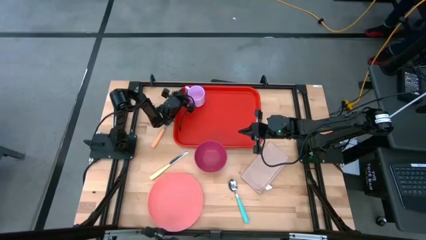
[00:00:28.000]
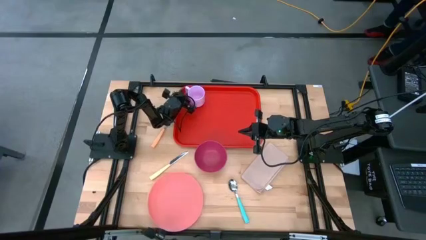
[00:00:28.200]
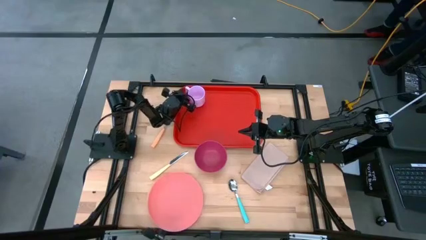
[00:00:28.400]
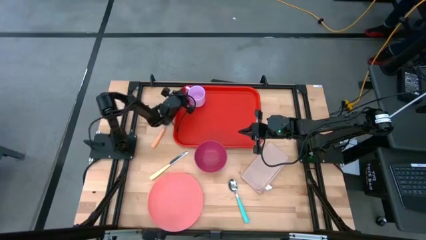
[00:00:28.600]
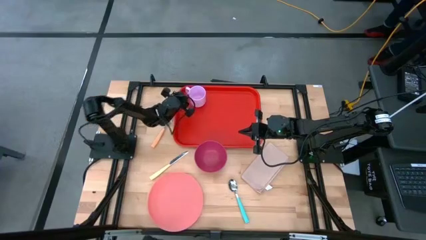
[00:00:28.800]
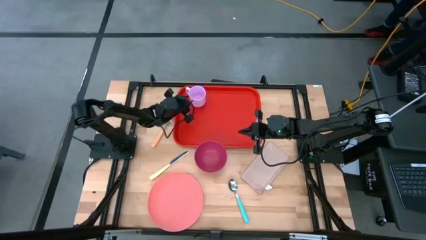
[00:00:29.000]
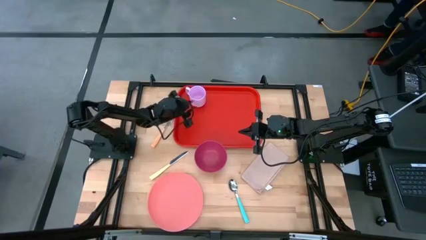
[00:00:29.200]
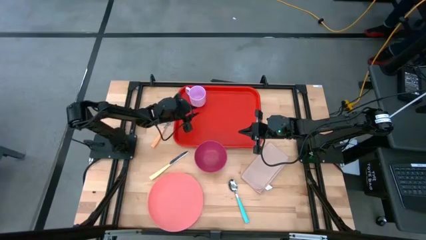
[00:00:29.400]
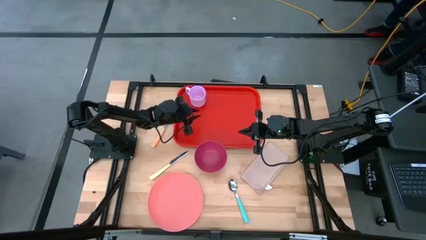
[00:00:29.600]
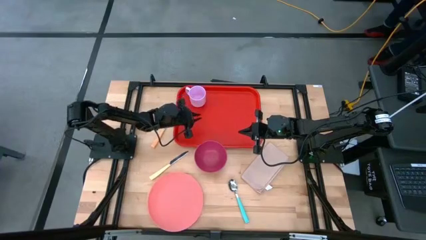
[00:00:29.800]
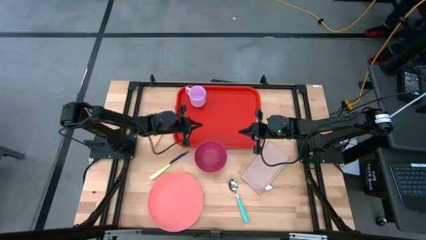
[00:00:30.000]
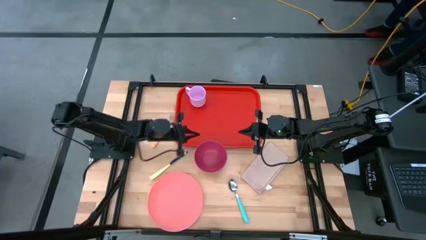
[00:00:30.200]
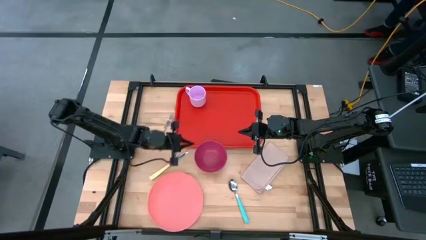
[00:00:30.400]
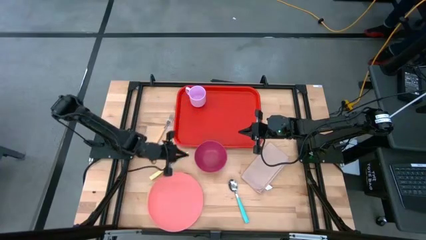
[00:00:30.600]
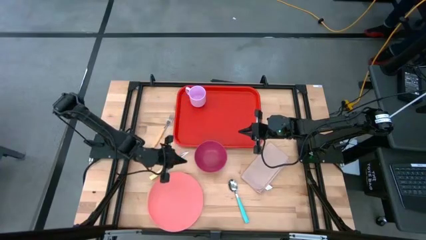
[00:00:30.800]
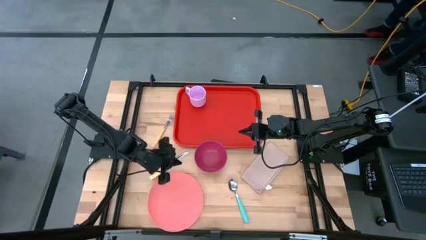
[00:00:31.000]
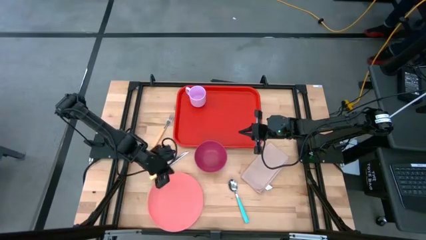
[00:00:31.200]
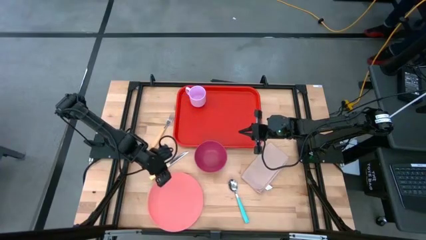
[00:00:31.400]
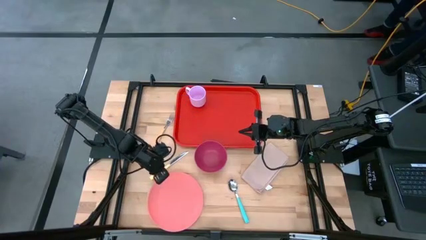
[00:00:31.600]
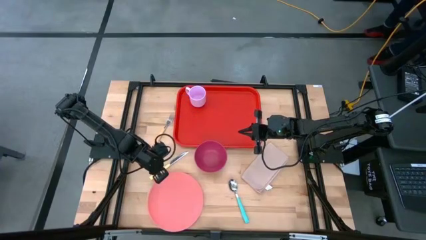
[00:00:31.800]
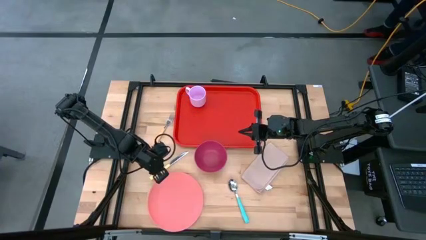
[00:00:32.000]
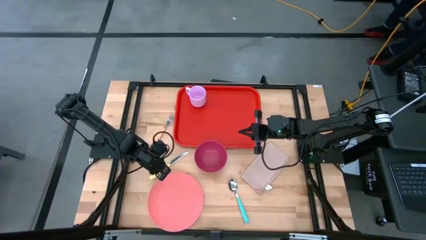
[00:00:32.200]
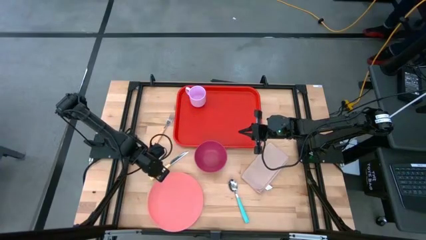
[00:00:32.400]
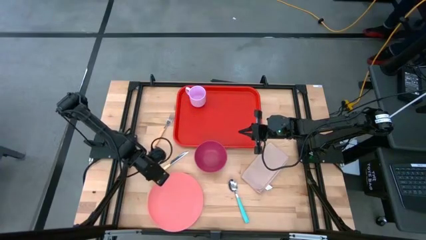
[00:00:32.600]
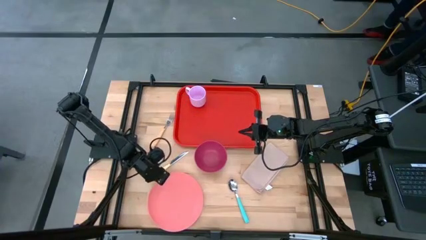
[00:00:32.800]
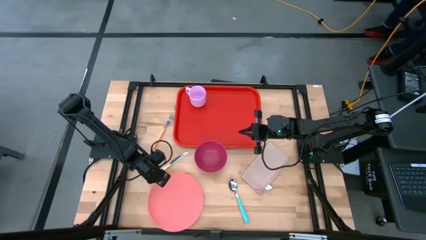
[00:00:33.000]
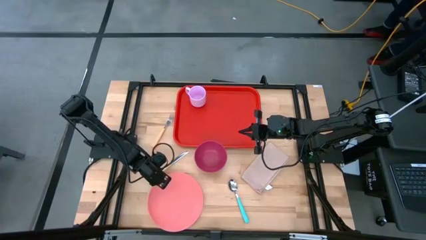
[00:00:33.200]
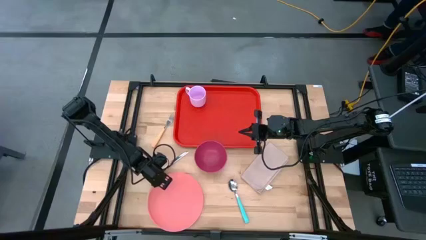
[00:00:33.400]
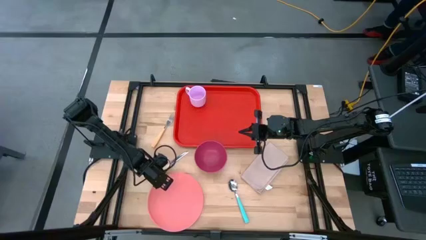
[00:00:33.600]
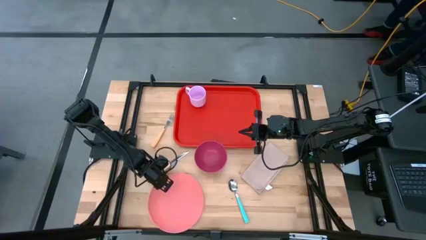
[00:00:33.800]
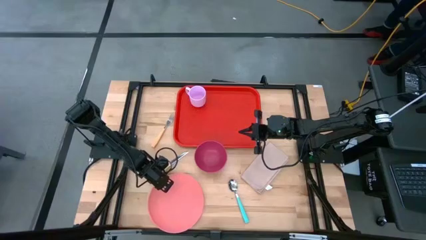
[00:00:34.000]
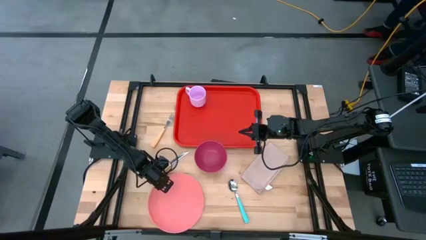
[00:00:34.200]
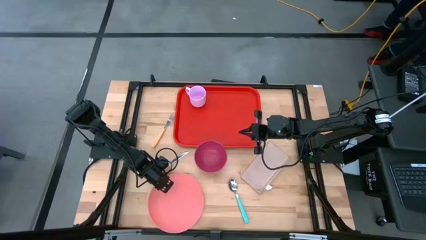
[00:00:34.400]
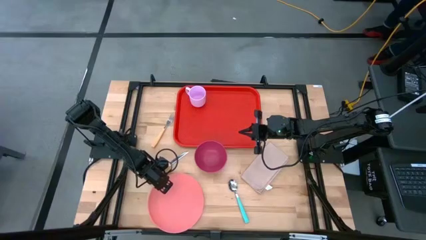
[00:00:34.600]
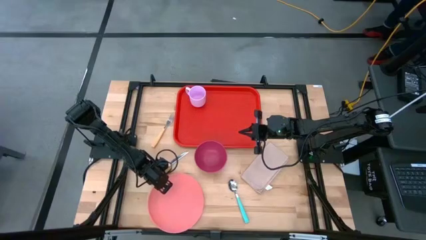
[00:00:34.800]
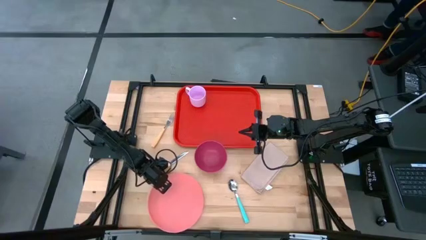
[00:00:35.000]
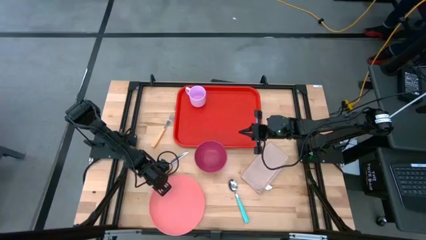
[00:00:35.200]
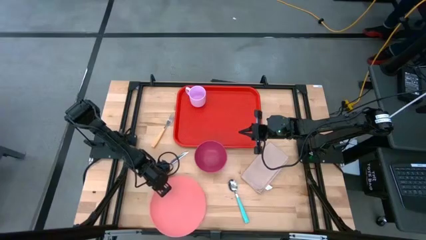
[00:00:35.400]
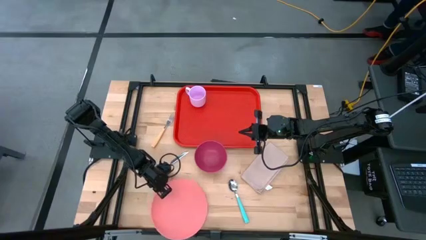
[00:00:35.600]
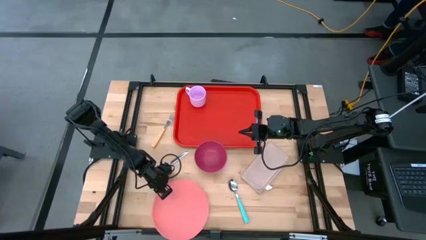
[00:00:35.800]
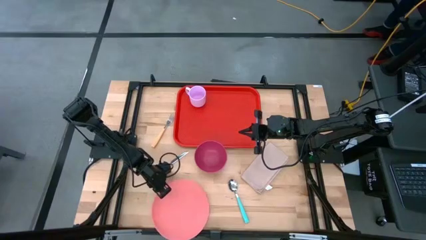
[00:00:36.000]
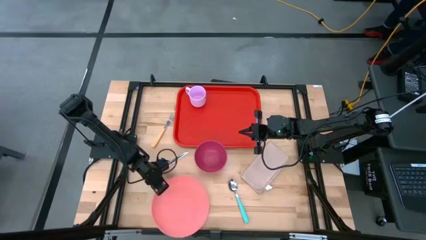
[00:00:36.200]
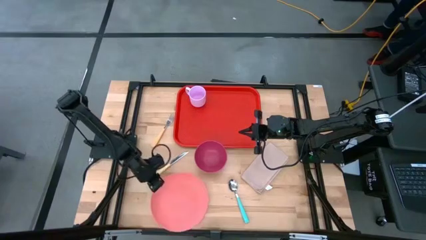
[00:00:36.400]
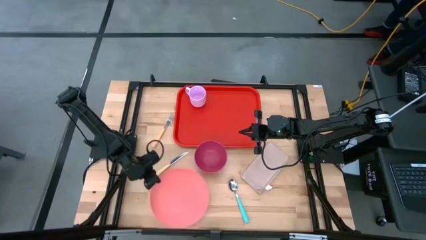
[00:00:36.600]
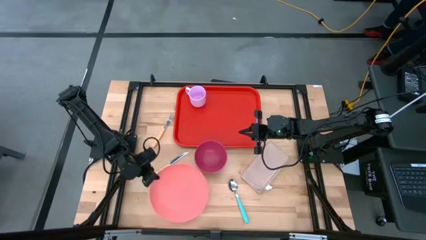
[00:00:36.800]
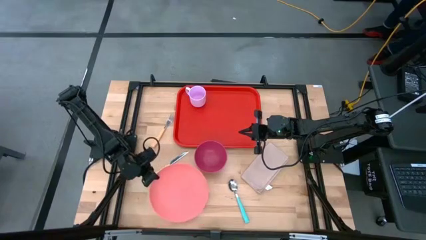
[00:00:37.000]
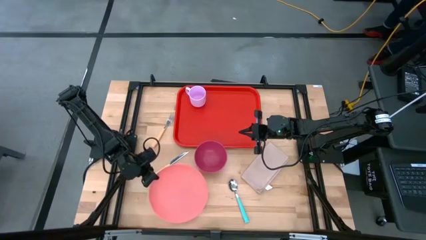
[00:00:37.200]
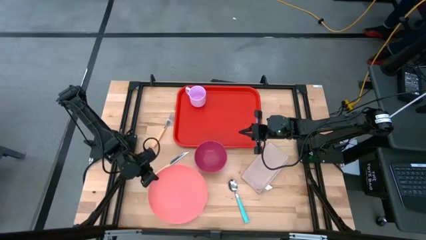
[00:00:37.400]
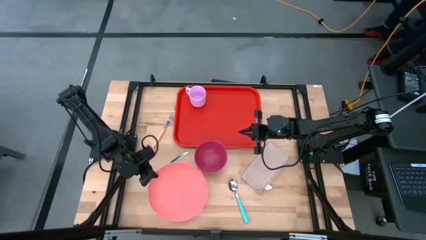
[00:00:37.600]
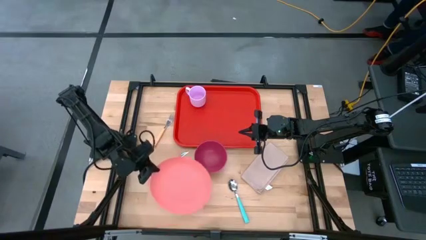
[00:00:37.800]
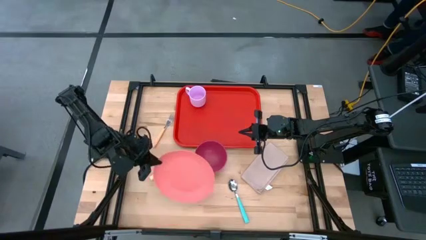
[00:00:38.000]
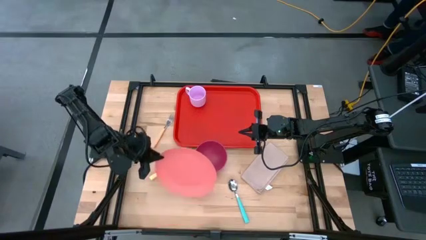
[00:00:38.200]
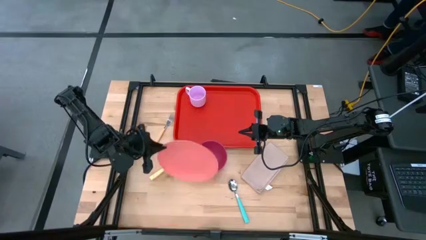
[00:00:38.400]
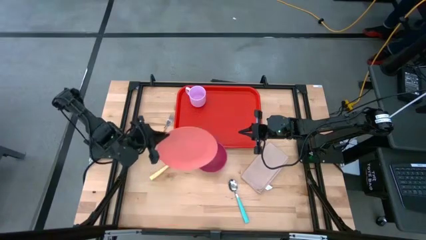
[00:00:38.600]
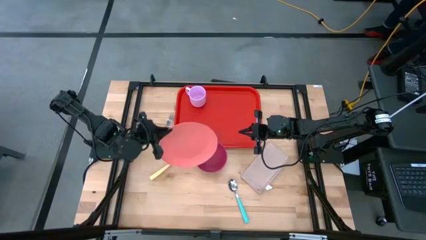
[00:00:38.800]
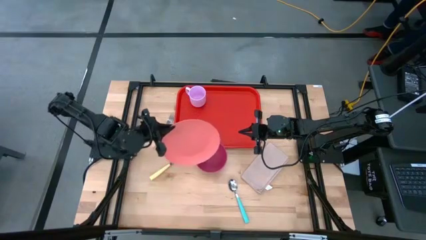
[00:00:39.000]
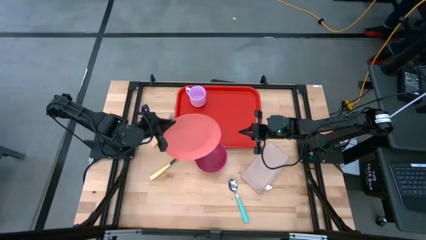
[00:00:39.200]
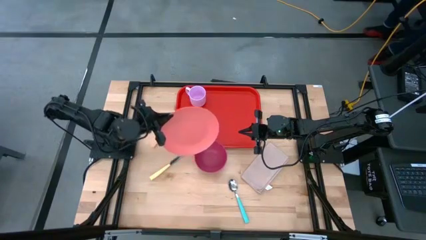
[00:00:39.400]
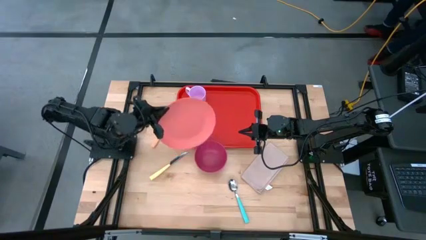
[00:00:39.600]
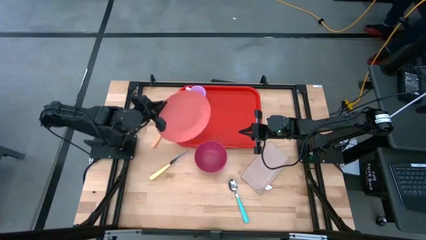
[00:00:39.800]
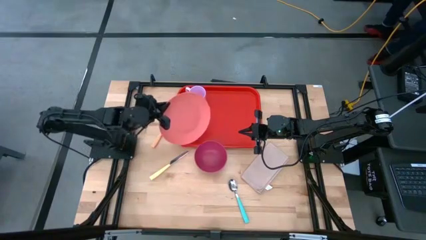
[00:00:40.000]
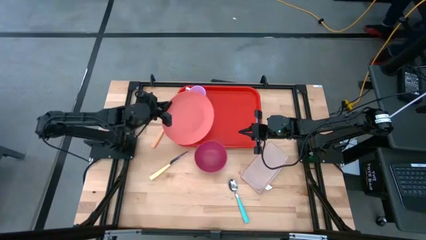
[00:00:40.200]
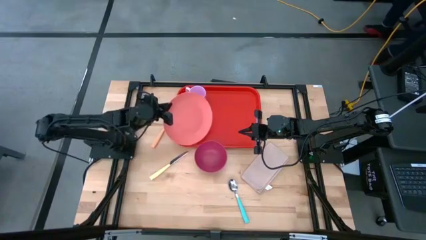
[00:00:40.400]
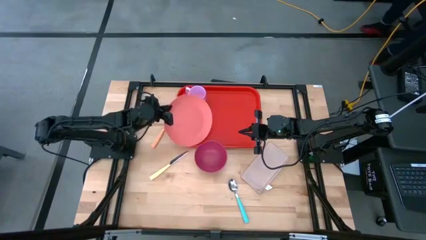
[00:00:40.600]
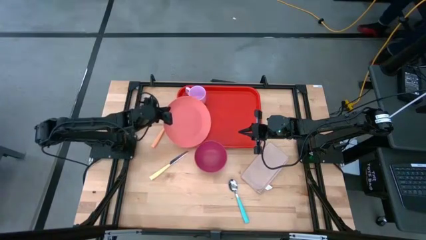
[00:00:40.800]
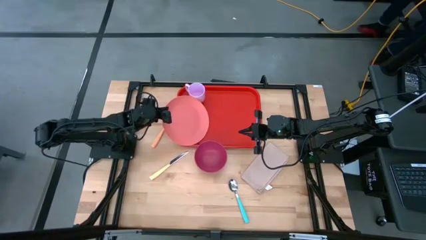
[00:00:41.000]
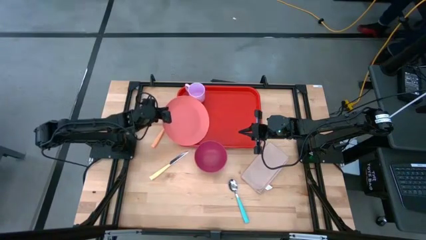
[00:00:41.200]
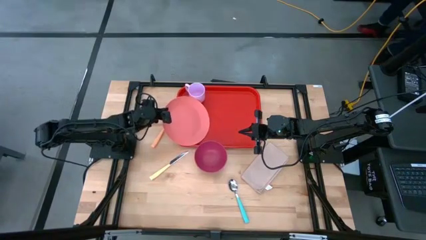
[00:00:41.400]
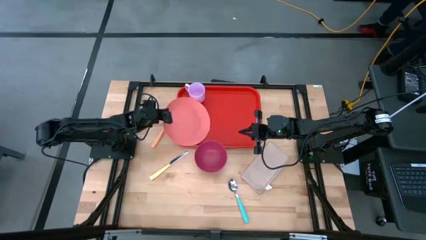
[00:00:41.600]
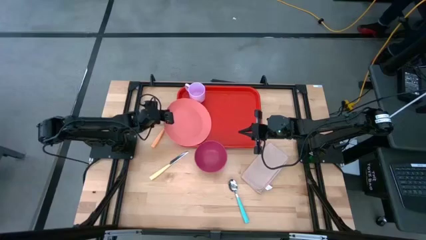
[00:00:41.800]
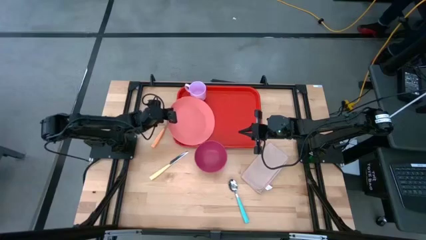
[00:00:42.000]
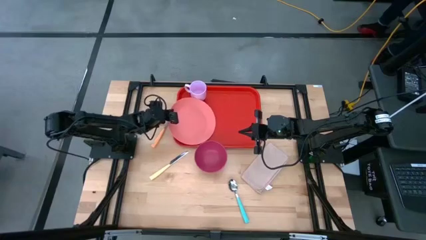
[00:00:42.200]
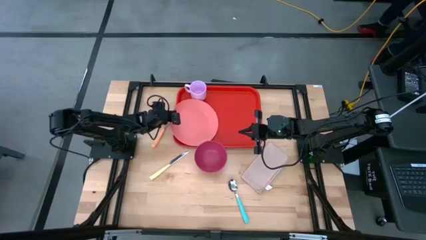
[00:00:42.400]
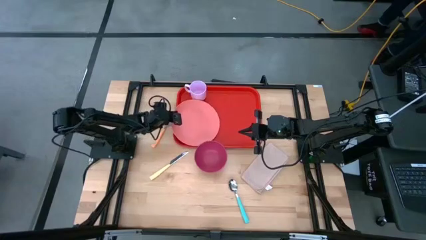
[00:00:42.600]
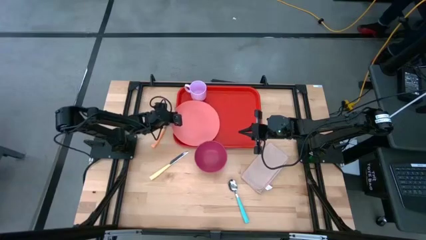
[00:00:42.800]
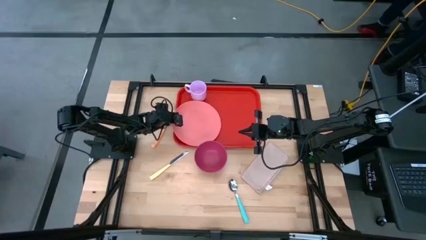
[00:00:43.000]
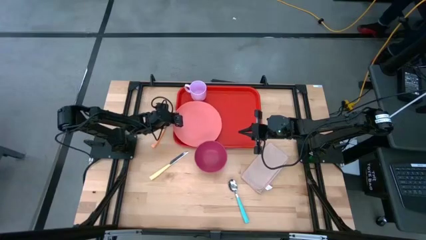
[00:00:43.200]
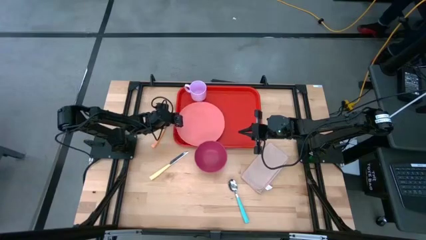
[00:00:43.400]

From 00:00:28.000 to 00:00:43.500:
Task: Set up tray
Put the pink plate on the red tray

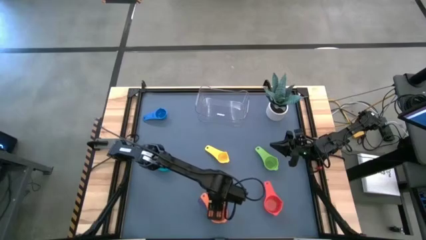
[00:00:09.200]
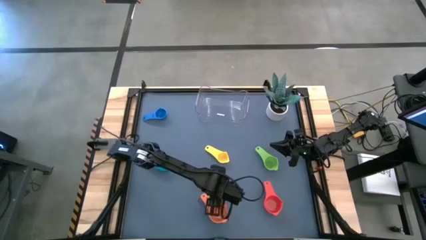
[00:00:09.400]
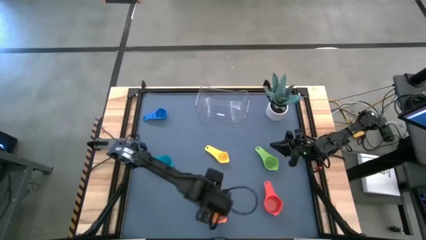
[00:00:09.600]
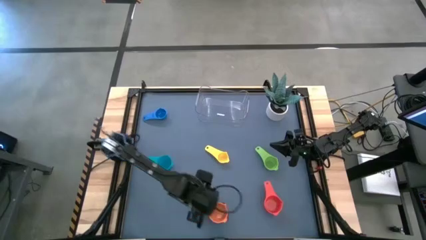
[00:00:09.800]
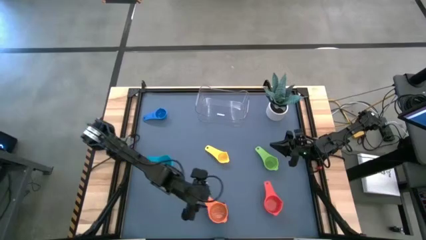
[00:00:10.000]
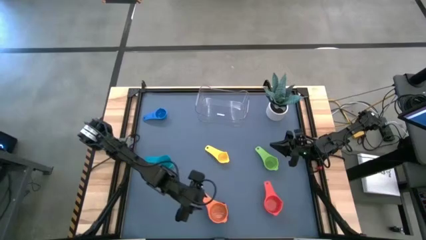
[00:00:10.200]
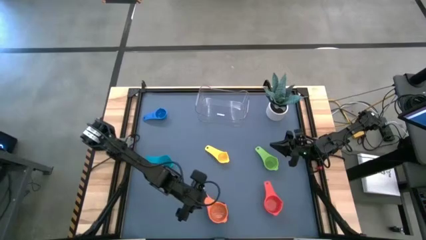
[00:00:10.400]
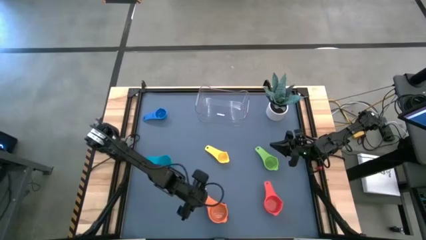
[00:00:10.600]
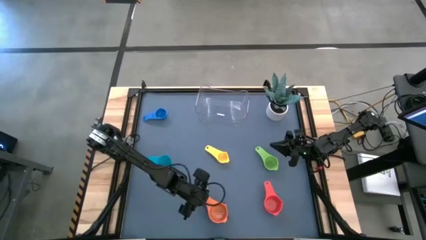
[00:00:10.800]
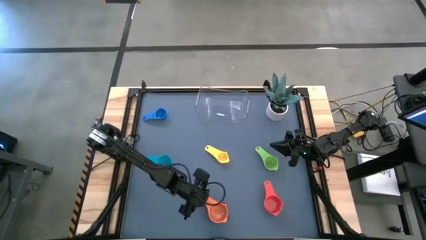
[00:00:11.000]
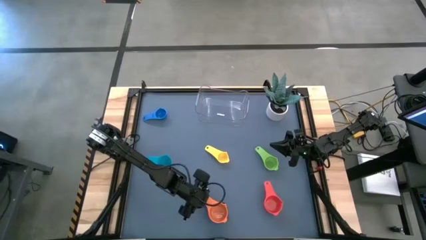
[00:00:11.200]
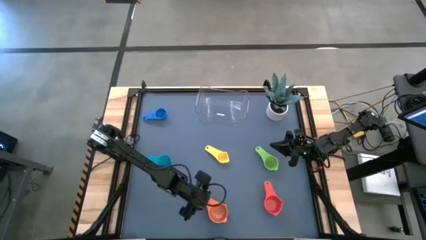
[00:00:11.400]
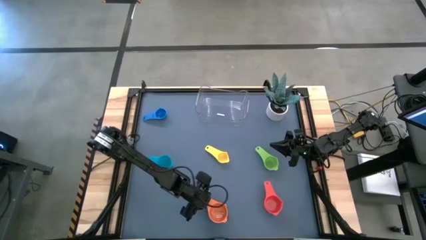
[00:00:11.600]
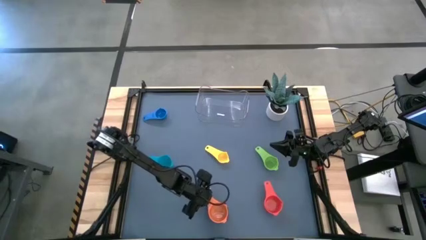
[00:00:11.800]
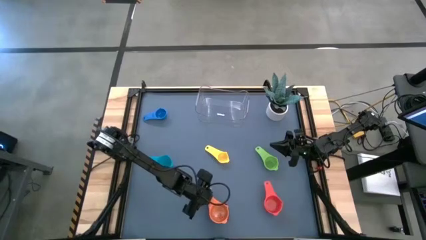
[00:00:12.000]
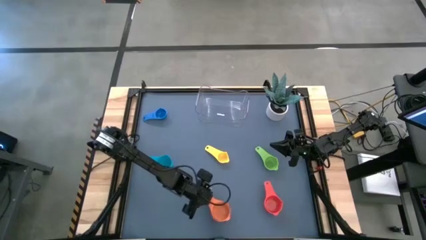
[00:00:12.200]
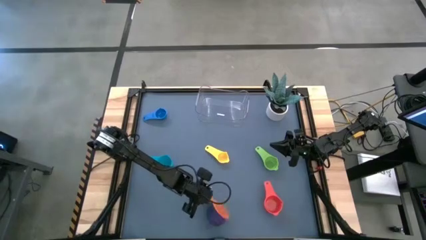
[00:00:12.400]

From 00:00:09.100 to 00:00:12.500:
Task: Nest measuring cups in basket
Move the stacked measuring cups to the center of the table
